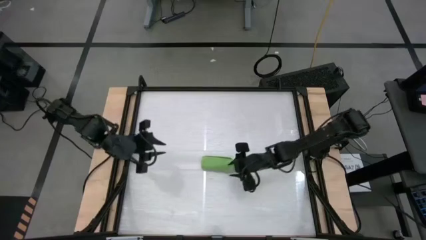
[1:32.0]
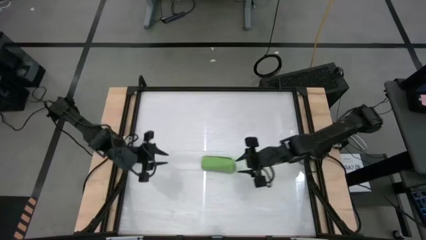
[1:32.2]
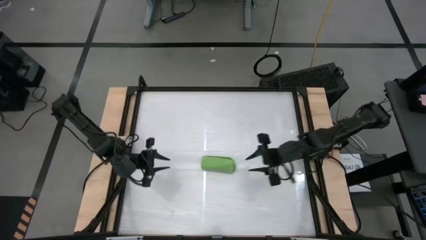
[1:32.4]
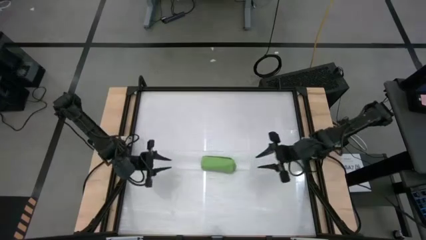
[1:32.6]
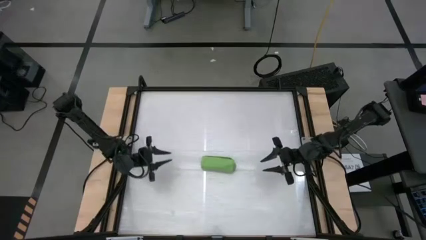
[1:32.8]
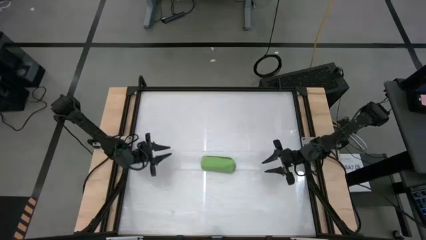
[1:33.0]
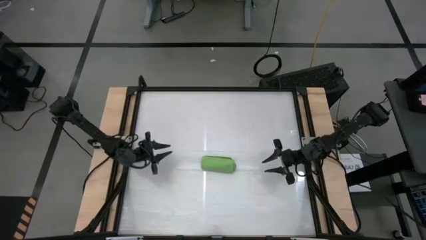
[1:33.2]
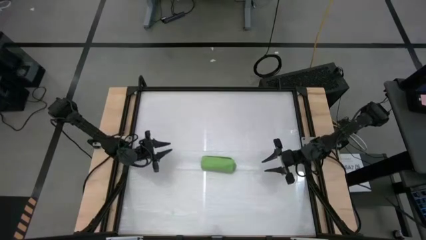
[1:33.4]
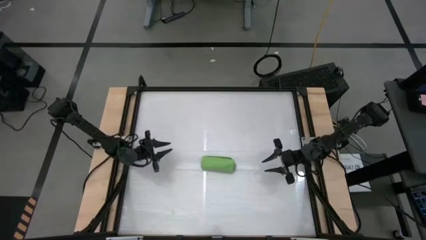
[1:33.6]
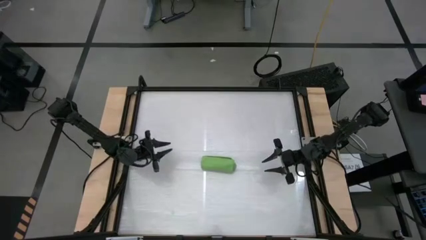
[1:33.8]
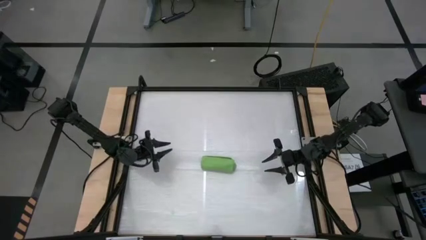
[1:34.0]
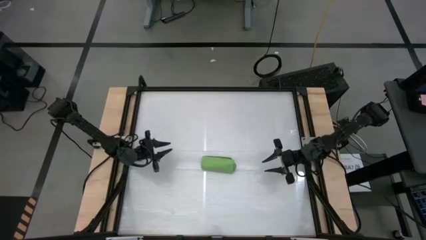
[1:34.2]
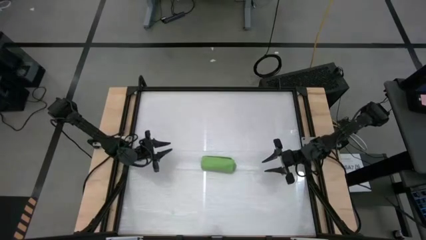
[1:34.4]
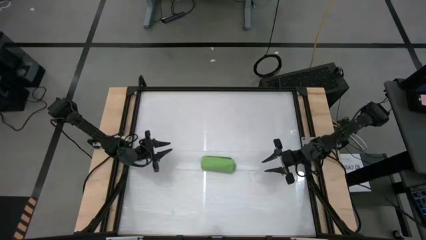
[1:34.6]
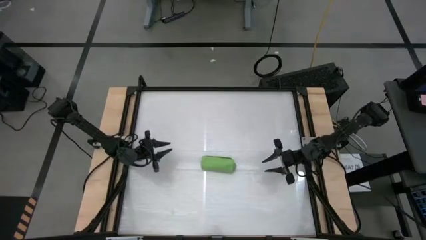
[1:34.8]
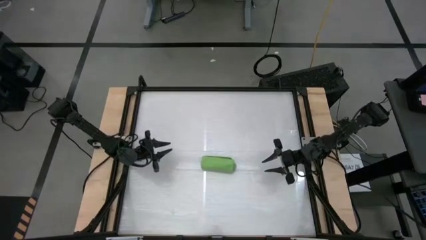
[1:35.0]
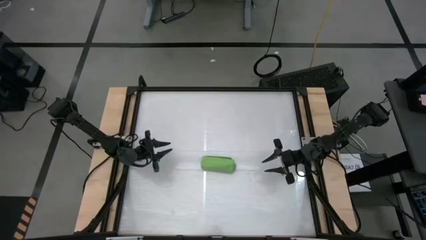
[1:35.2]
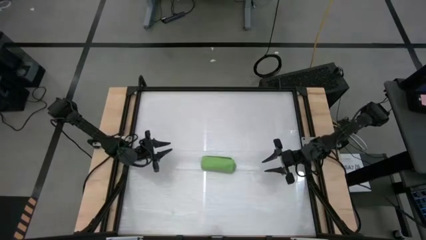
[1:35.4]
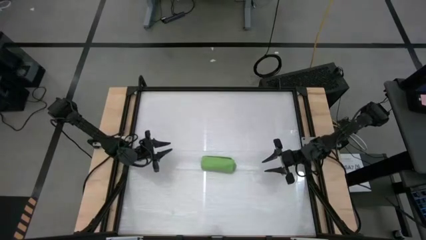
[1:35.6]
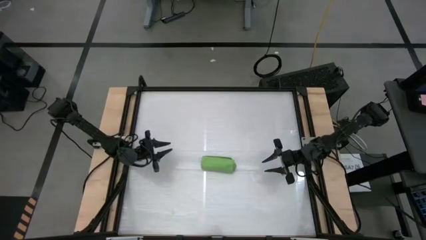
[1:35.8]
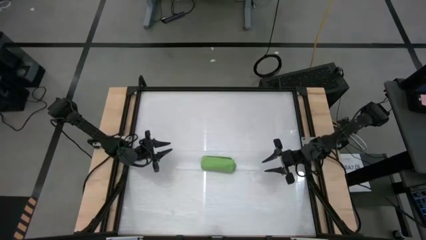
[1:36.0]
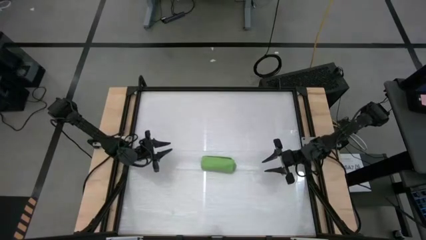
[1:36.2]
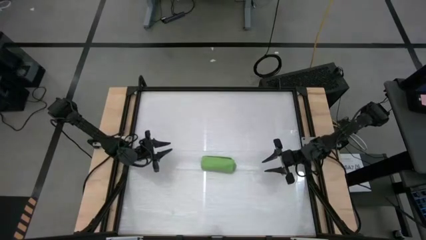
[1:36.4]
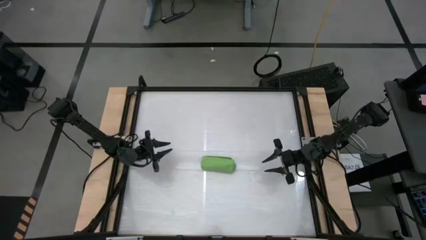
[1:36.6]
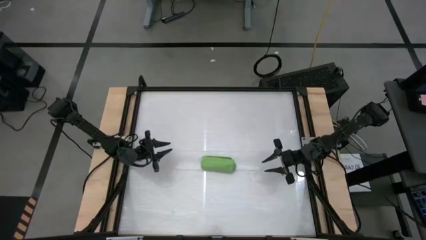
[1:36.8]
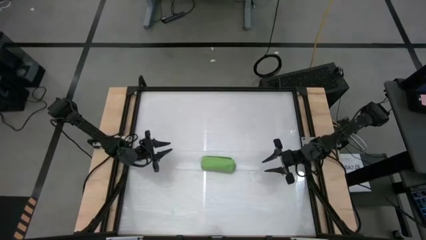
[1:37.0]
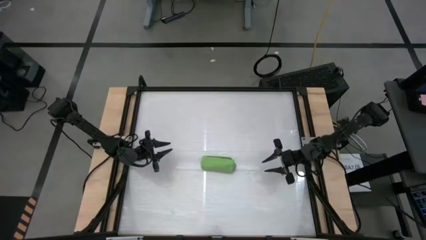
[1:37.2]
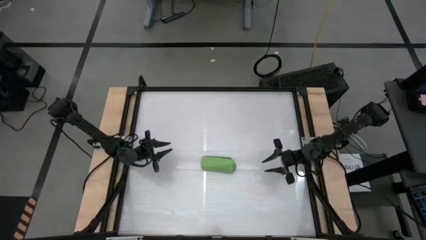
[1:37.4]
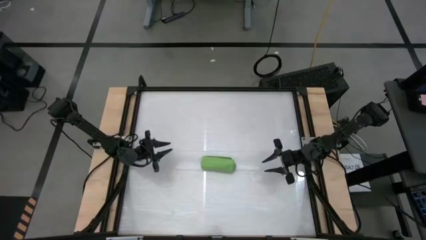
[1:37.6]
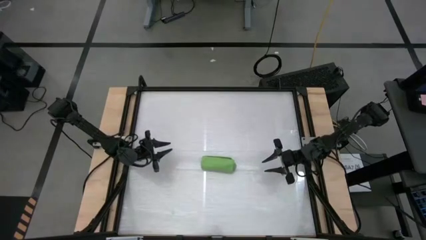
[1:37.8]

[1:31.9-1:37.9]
Task: Roll towel into tight, uniform cylinder
Return to Home Position

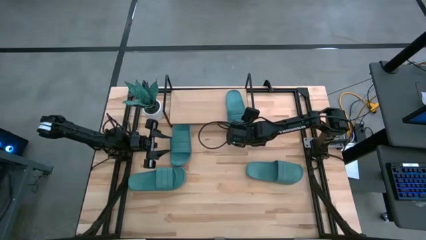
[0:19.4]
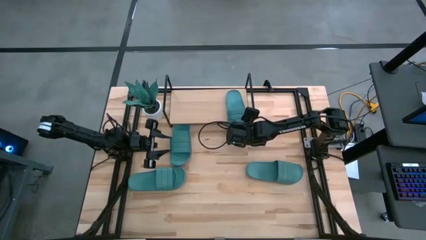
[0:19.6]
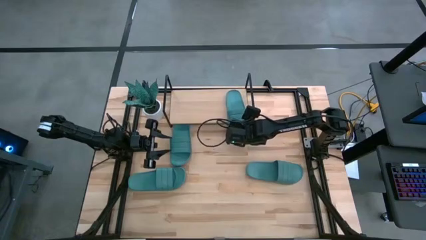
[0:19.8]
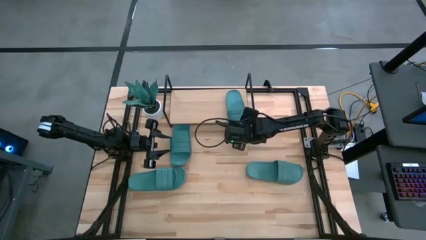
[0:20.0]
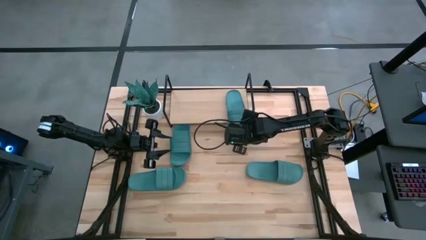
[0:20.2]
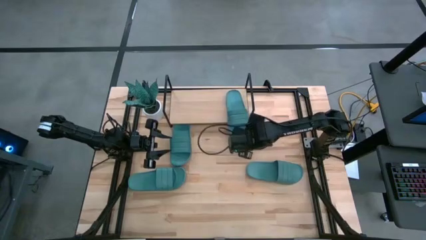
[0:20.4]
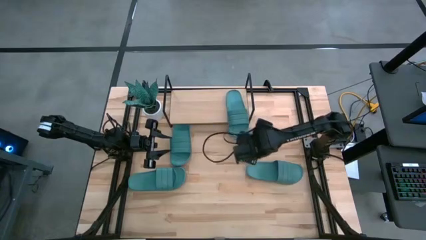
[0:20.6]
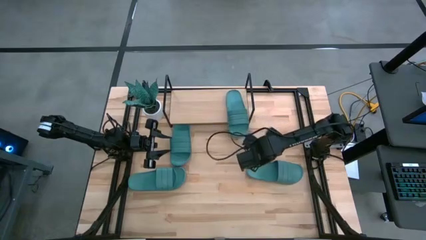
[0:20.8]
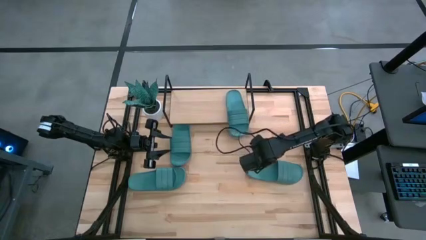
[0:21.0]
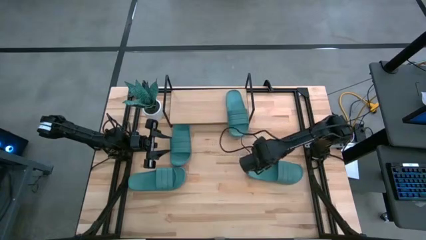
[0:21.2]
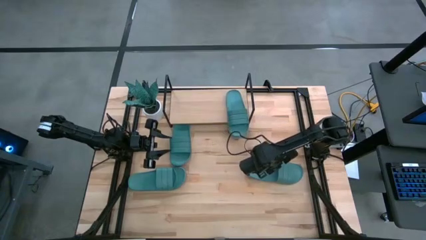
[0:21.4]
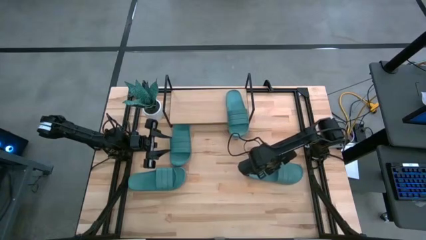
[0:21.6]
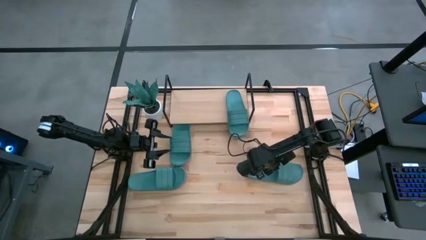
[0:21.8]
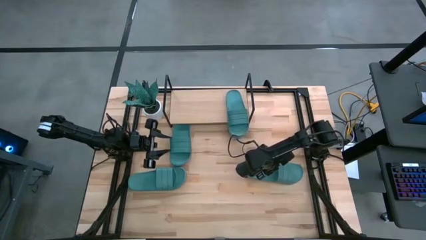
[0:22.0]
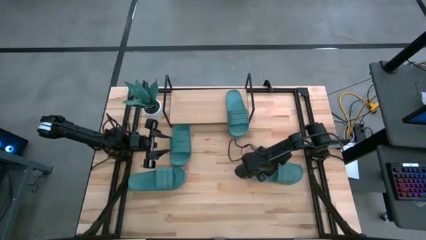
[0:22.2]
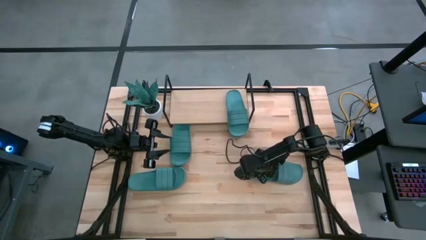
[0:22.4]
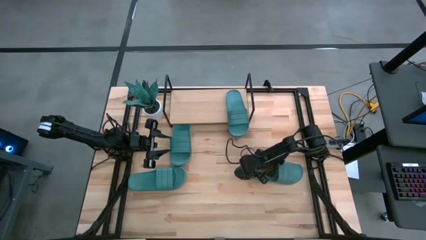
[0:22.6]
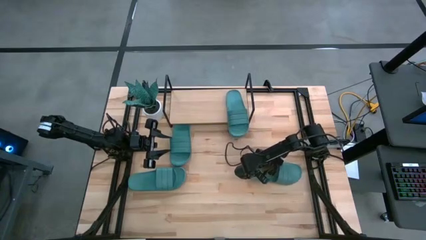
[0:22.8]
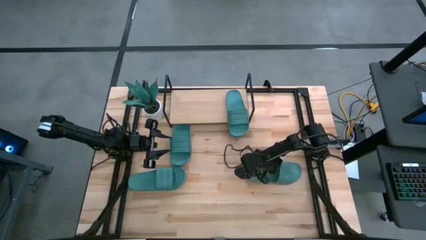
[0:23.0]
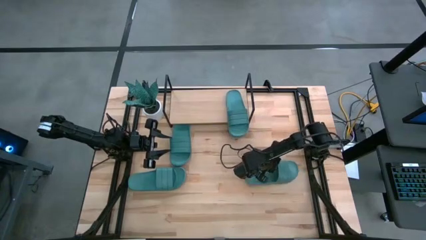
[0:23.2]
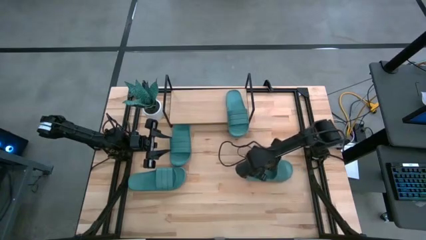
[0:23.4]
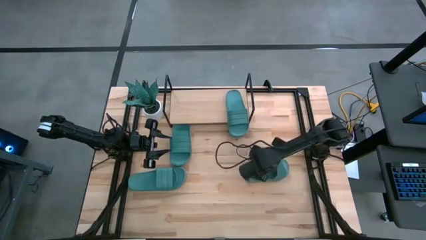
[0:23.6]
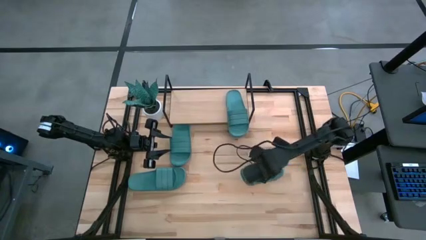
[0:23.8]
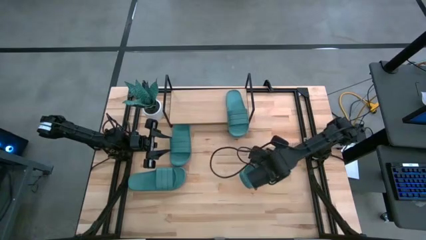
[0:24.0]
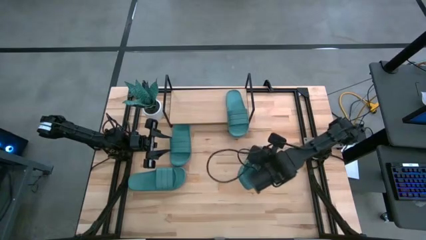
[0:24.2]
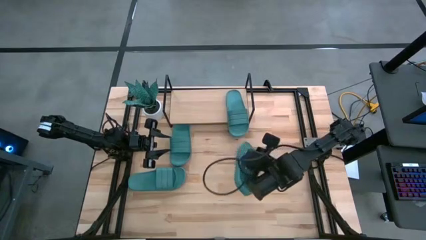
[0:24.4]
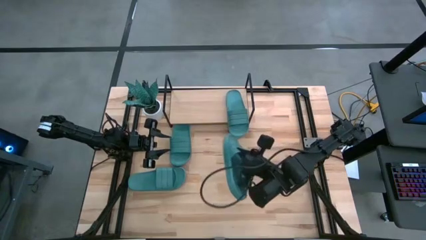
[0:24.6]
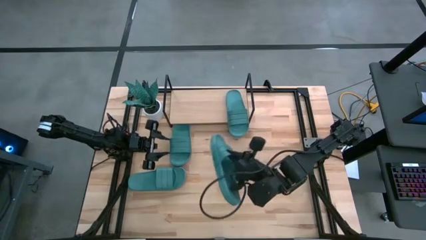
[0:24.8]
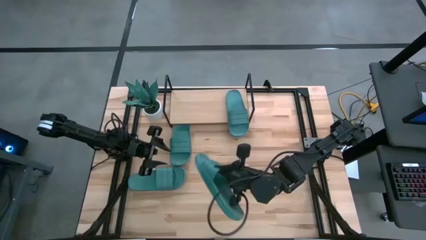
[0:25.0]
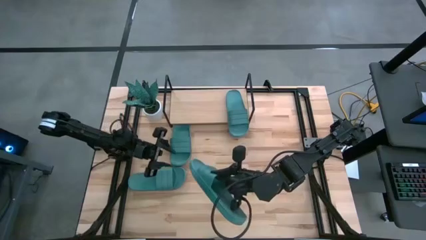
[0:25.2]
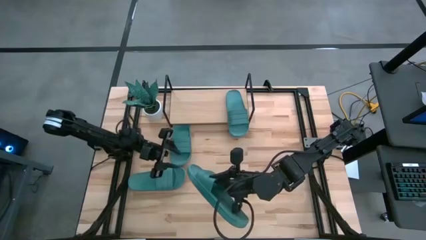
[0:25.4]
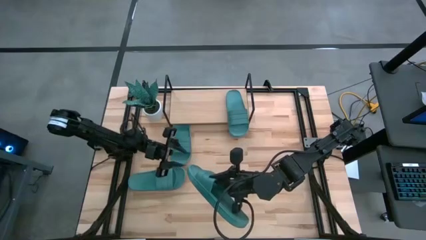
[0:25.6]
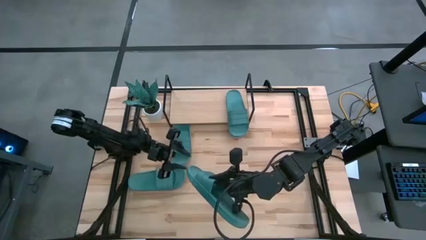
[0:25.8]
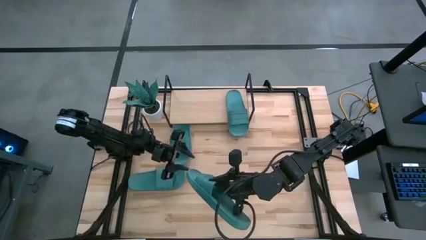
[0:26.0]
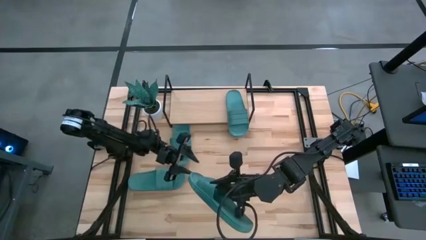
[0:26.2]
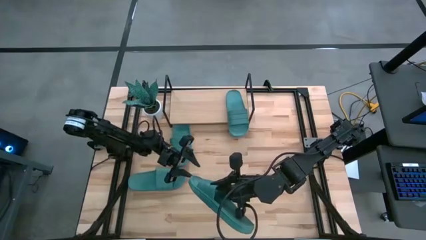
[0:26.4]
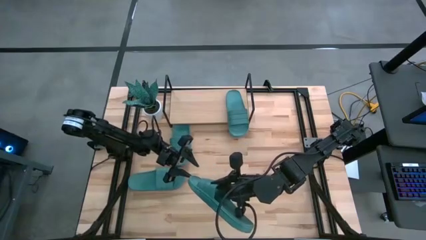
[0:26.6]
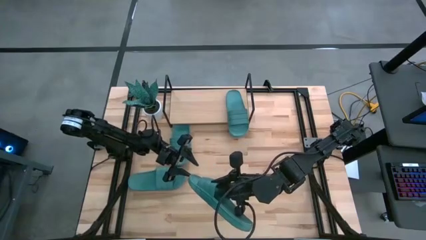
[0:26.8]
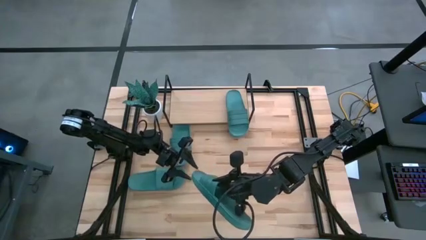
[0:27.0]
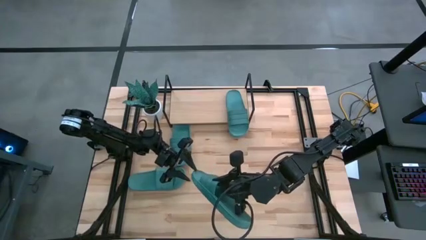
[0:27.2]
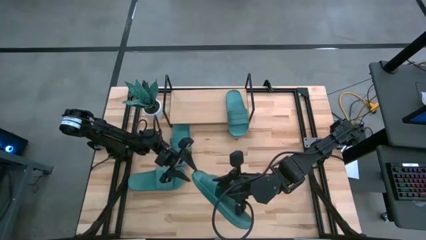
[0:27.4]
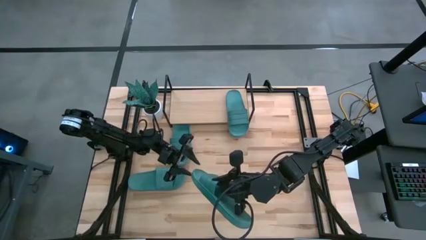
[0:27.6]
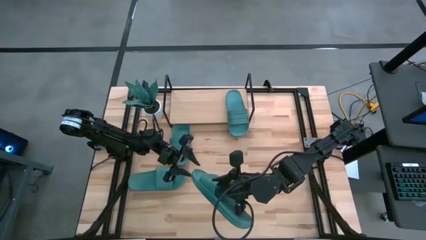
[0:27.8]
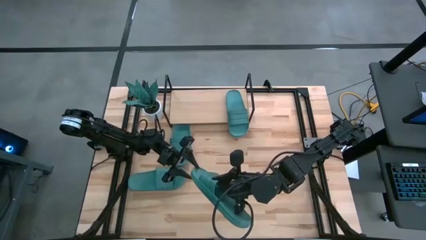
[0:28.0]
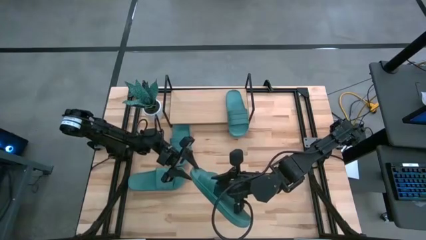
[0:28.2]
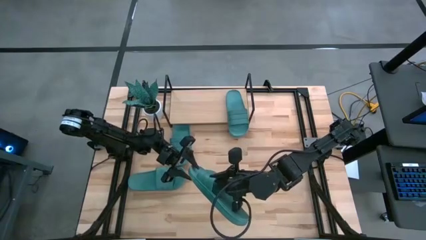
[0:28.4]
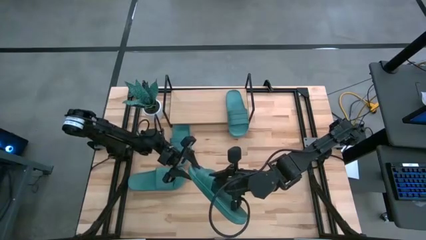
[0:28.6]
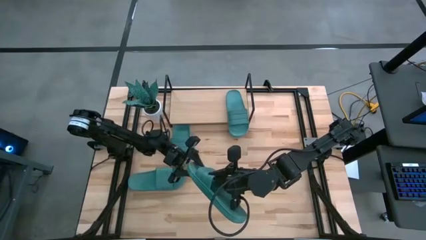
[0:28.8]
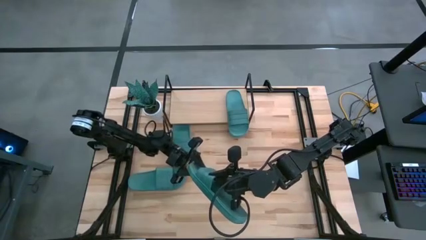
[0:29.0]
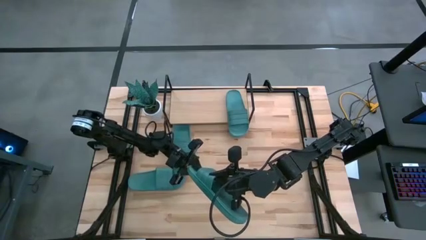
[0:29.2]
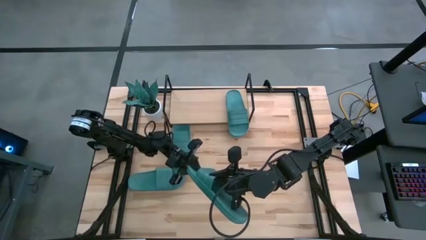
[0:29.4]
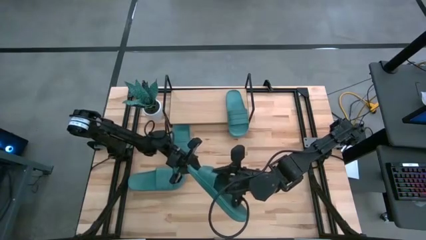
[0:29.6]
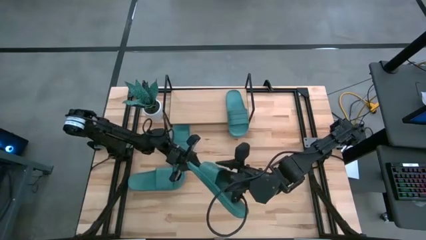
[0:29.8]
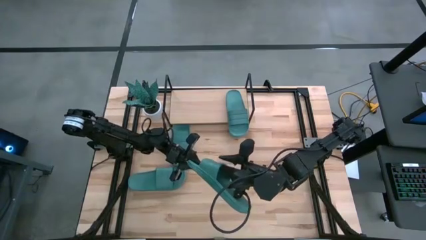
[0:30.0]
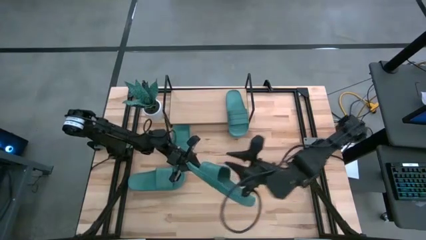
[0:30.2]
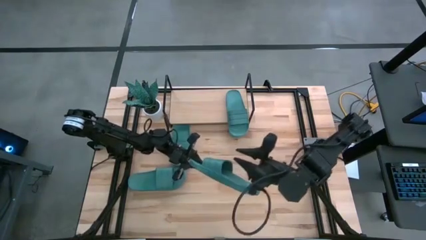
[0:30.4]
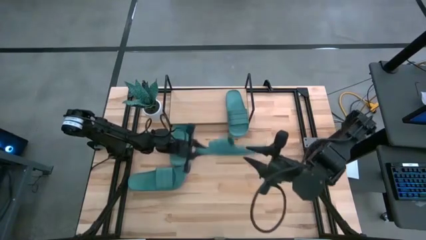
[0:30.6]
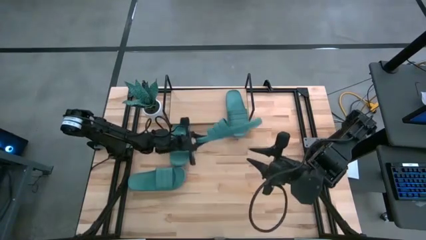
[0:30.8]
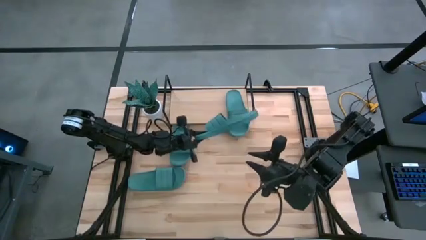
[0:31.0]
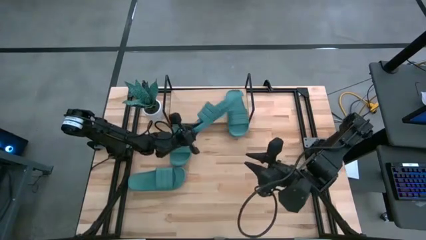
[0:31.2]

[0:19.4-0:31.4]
Task: Pick and place slides into the shelf
Put the green slipper on the shelf
